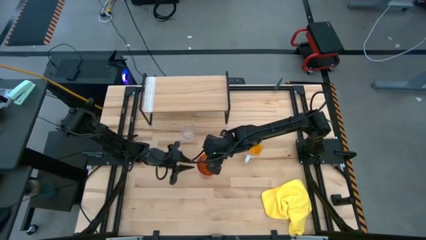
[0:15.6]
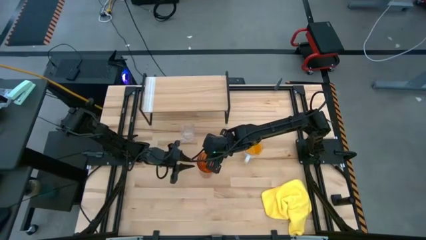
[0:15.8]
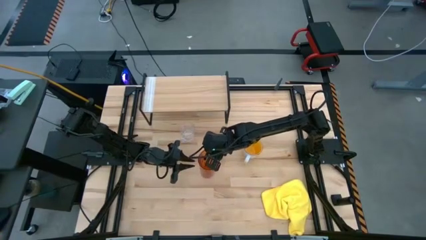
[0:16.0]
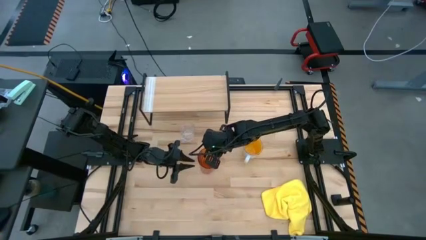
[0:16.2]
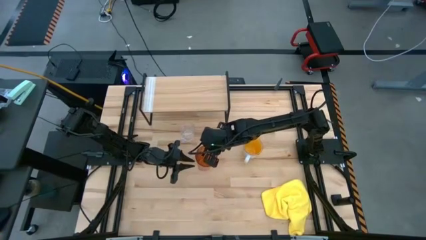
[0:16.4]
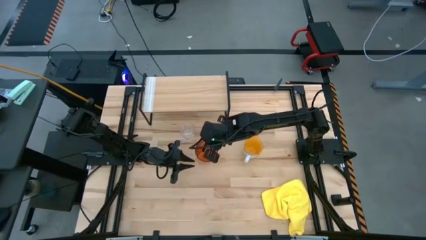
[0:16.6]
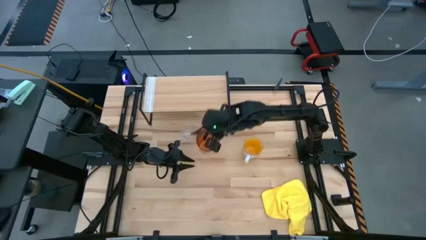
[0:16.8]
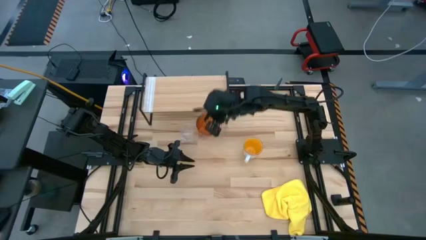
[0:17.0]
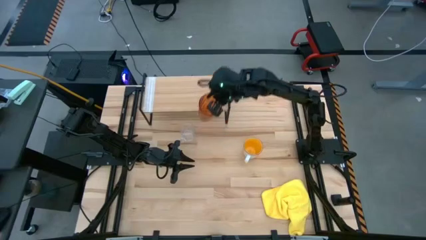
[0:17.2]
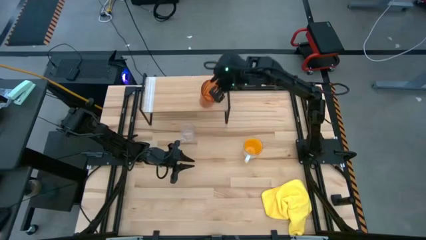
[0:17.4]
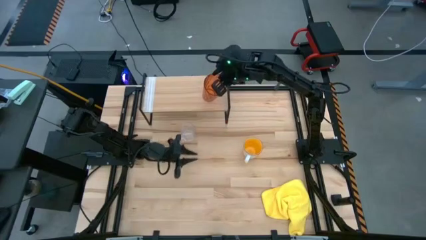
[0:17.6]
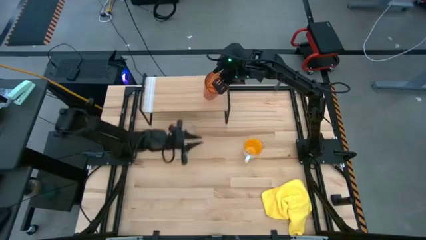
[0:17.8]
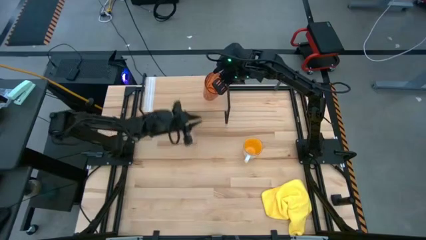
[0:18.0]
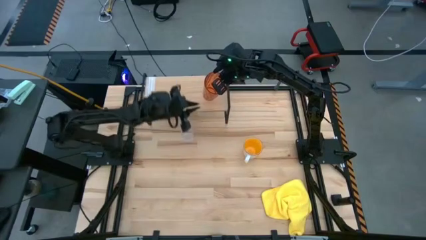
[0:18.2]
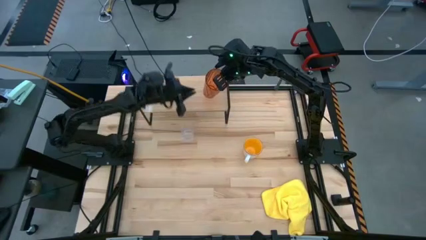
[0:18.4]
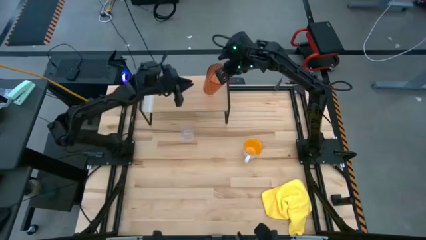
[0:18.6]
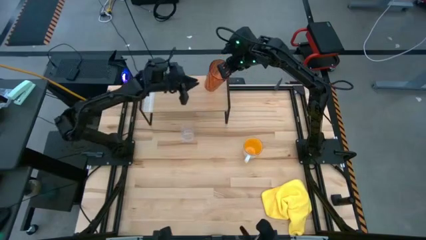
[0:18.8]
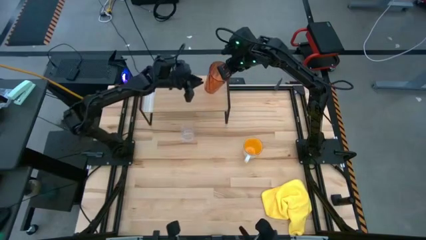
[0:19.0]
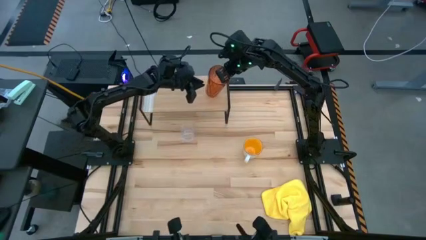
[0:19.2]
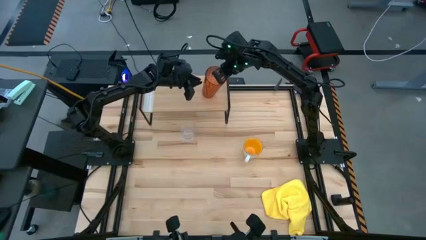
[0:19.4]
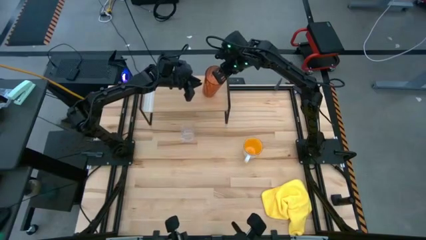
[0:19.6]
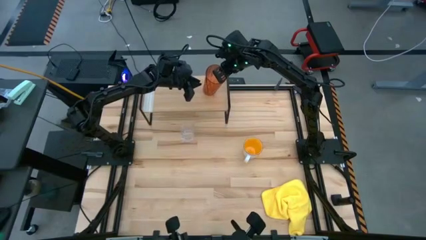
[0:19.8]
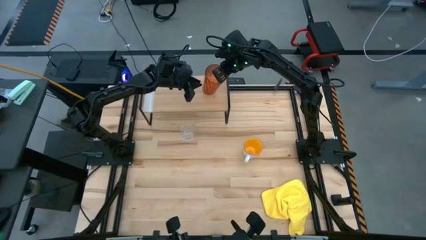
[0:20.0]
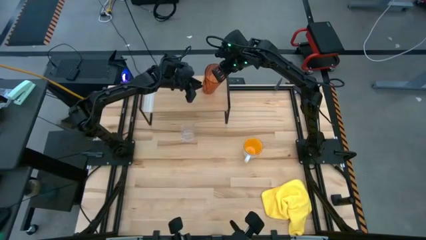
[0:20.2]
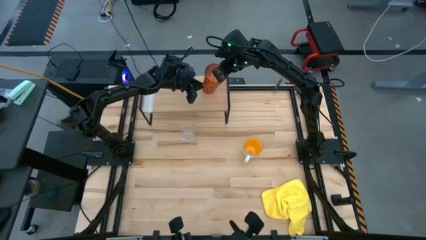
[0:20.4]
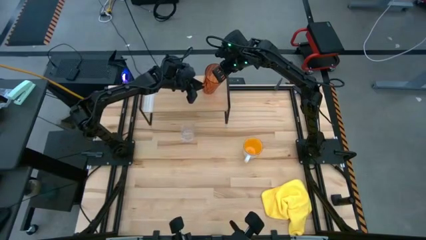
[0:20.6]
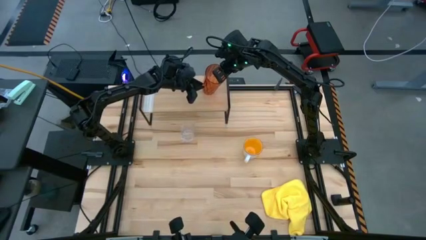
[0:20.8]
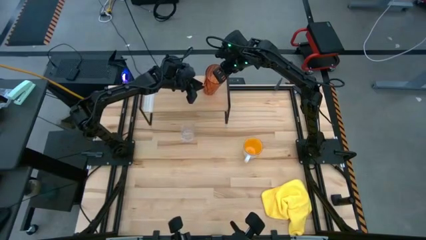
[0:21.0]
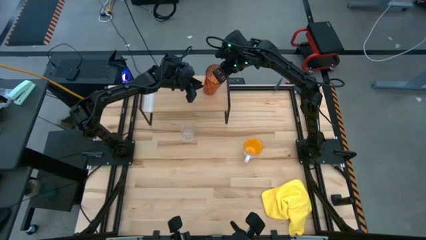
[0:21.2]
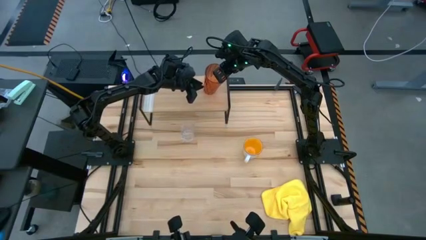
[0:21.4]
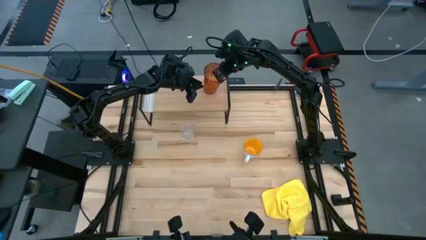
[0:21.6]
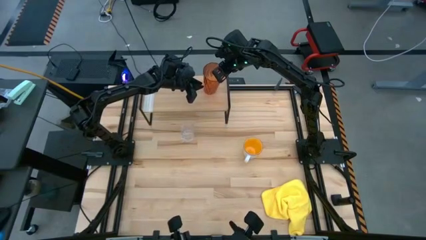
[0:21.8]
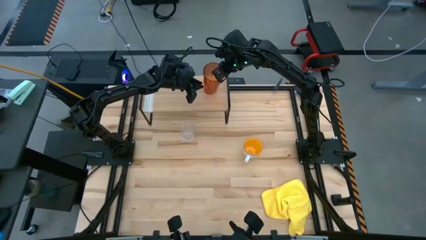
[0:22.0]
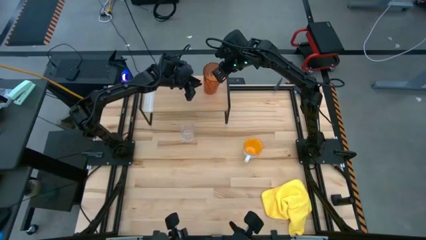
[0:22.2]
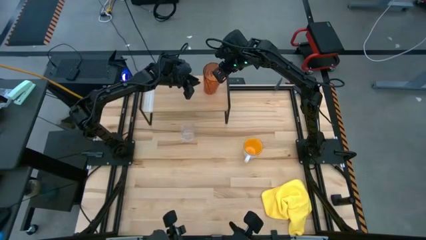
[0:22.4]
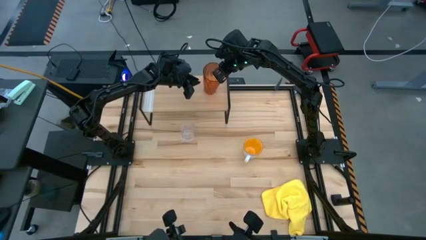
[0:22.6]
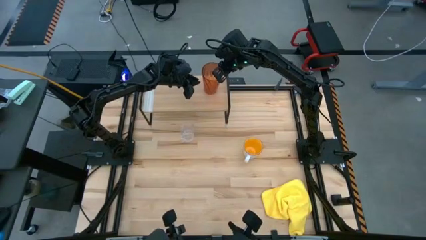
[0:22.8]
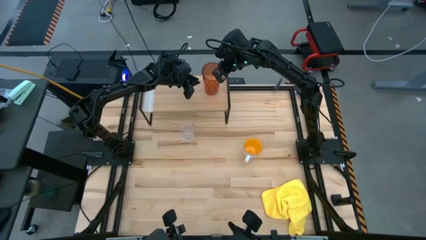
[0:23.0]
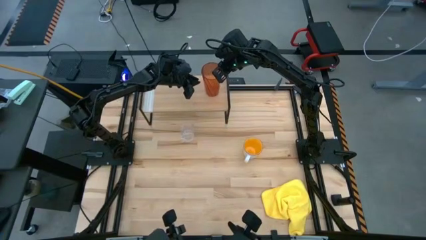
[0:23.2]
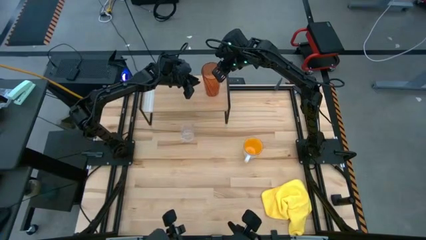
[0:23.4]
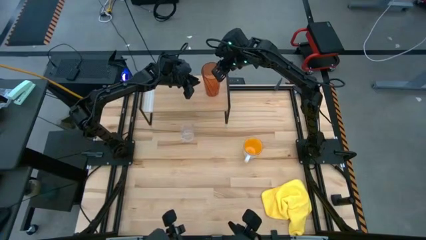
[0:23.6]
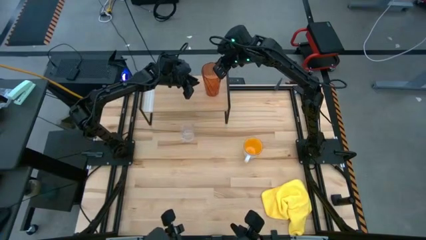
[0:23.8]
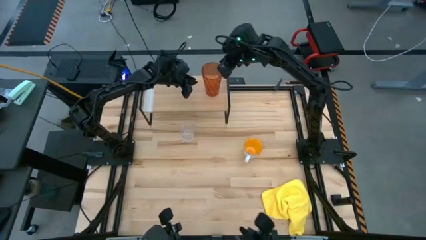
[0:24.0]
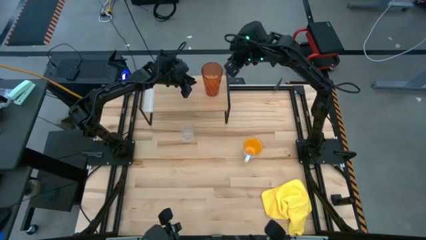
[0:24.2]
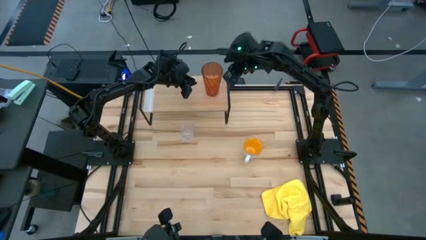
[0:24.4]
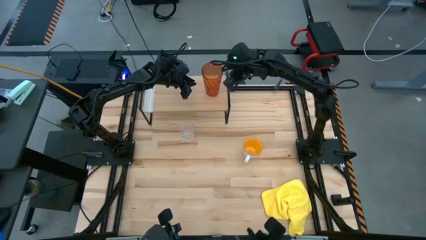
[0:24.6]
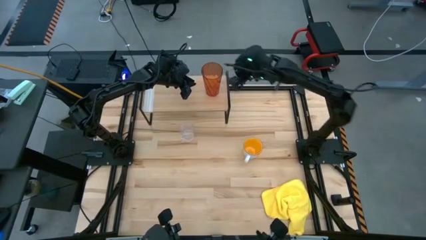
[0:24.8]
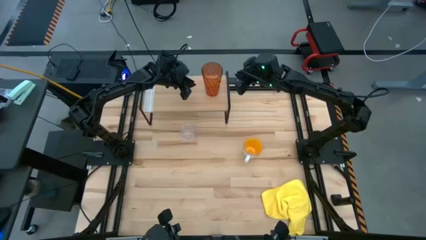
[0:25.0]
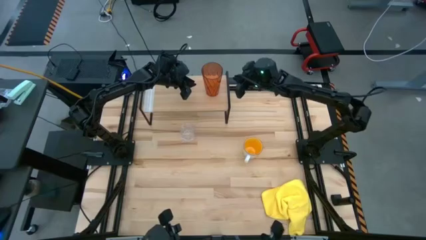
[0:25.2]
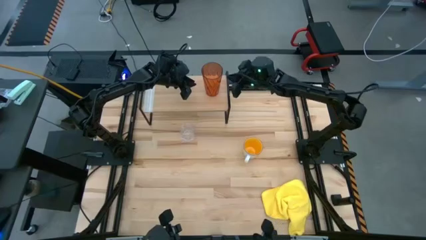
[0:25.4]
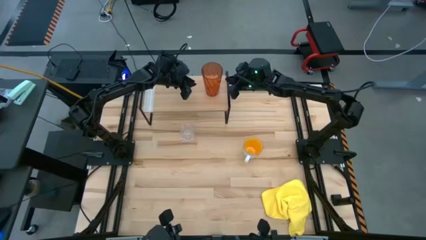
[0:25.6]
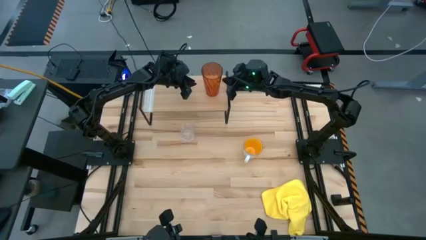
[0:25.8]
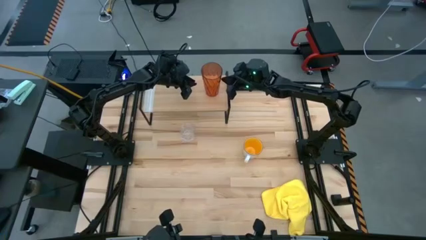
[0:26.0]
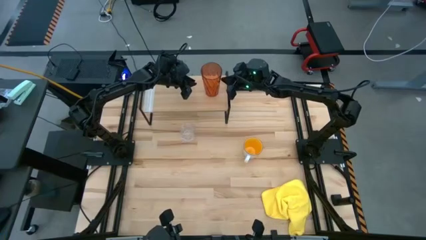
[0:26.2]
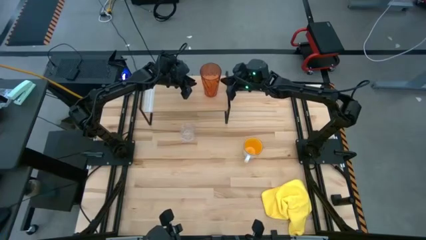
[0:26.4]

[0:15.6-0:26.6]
Task: Stack small to large cups/mugs on shelf
Put the orange glass on the shelf
